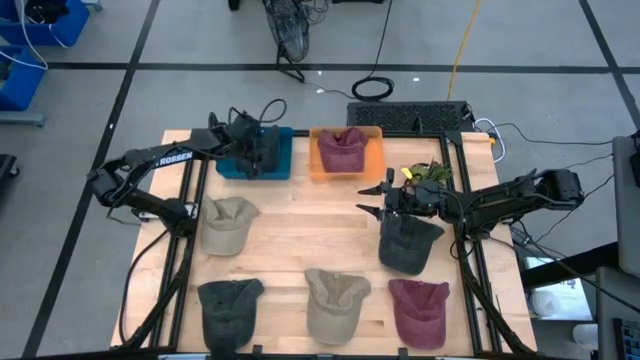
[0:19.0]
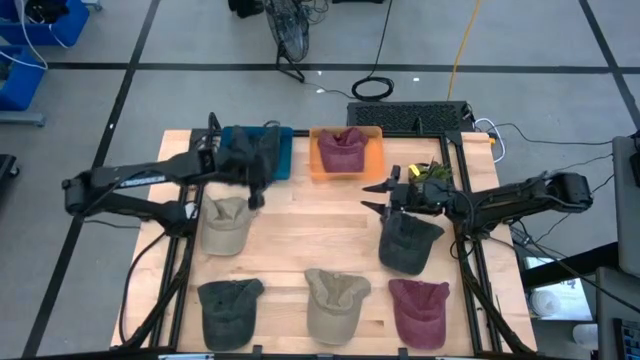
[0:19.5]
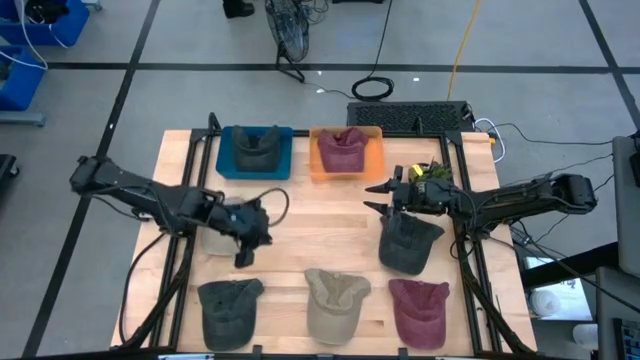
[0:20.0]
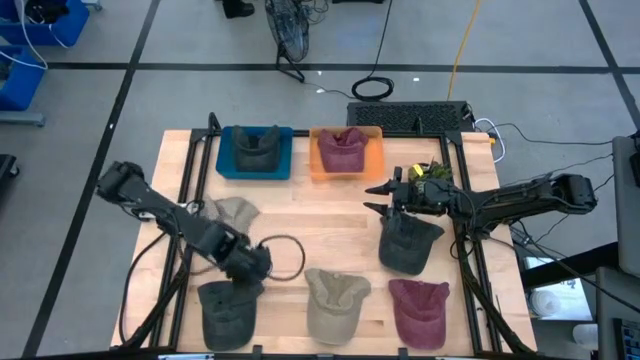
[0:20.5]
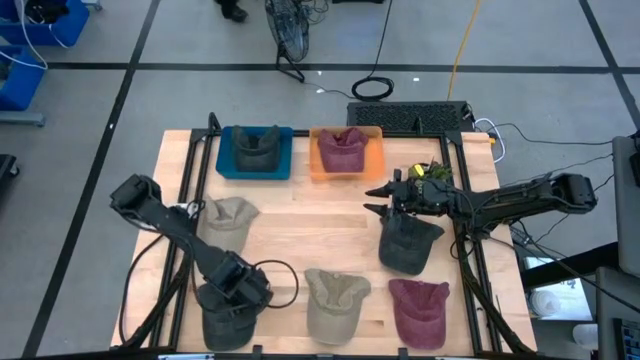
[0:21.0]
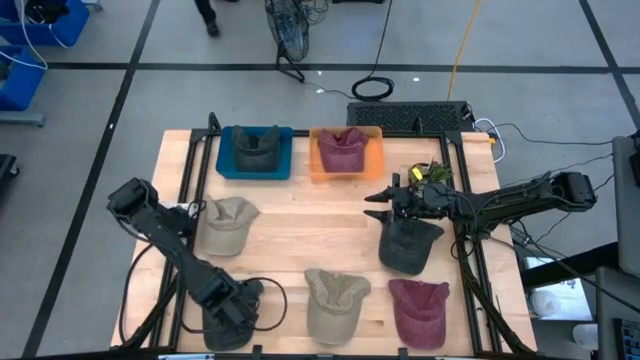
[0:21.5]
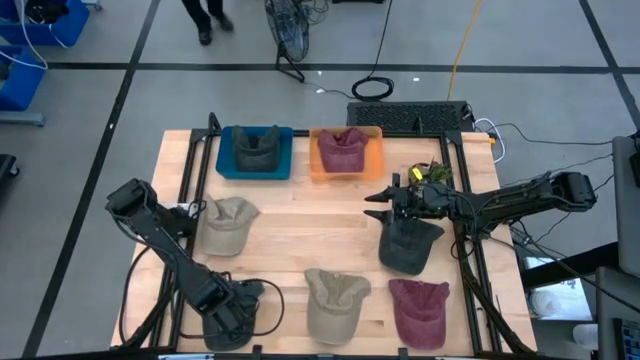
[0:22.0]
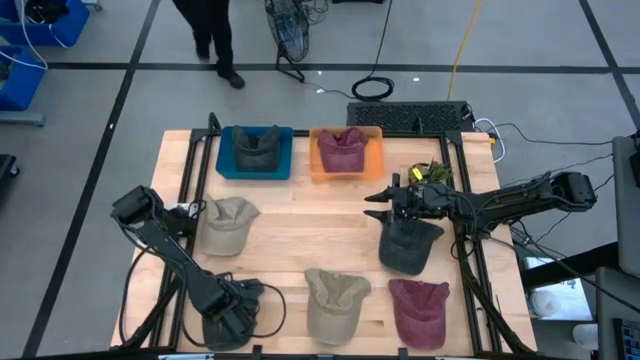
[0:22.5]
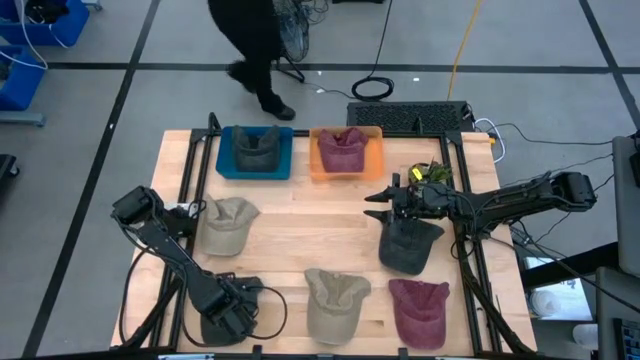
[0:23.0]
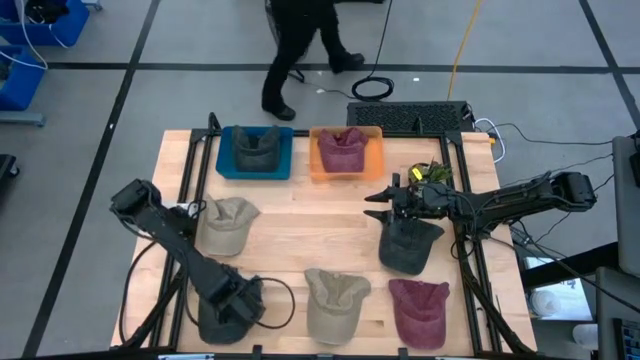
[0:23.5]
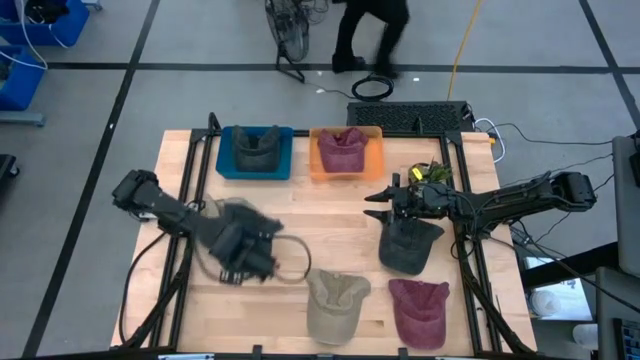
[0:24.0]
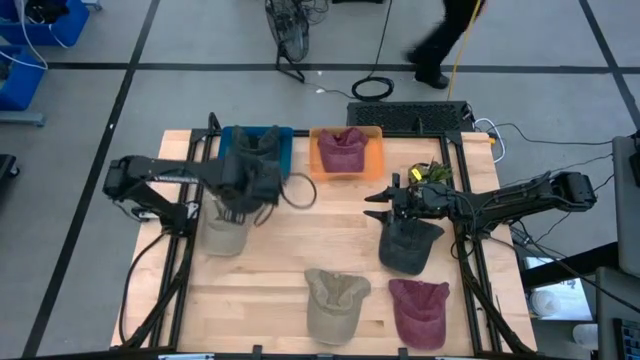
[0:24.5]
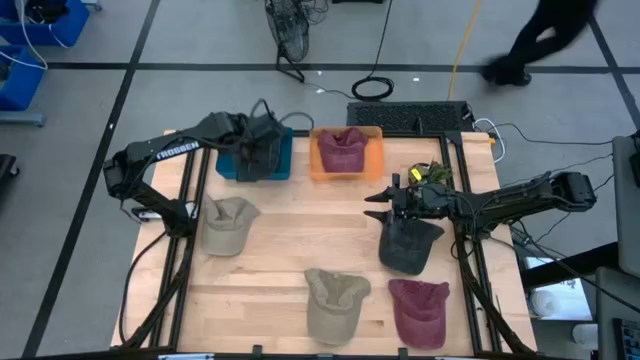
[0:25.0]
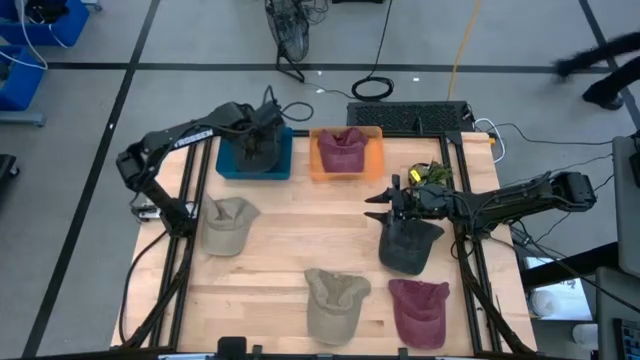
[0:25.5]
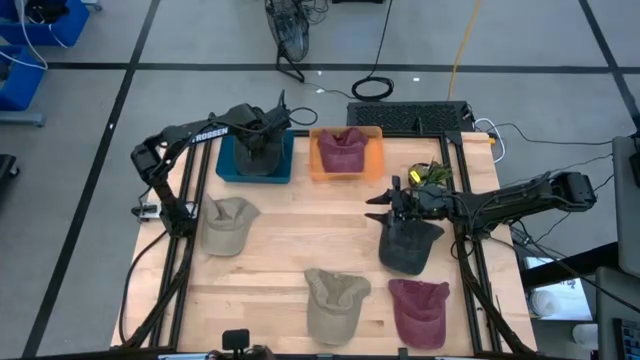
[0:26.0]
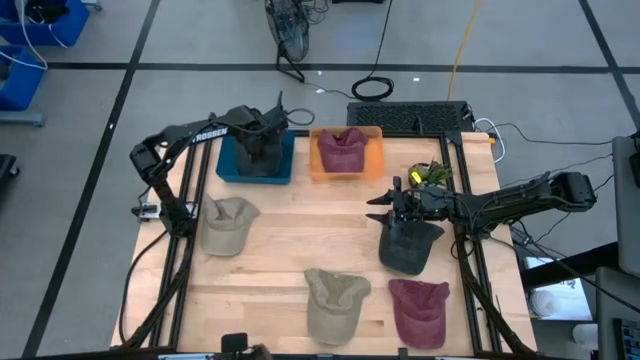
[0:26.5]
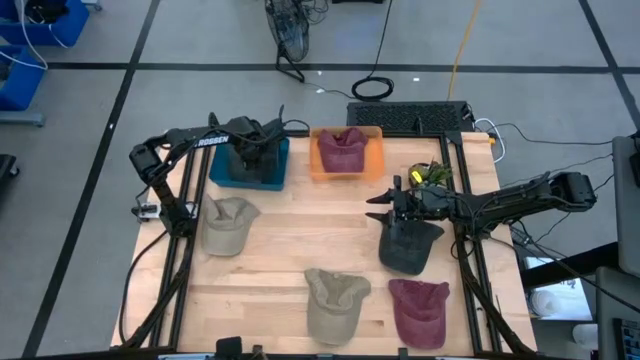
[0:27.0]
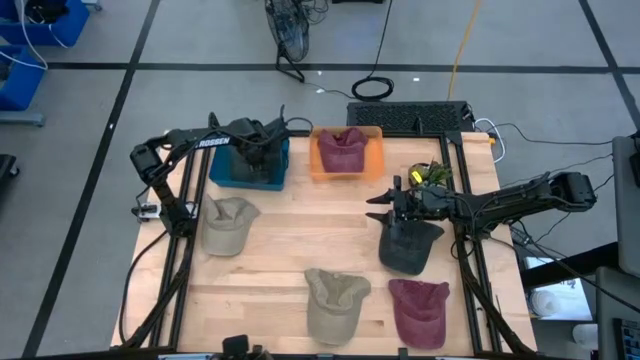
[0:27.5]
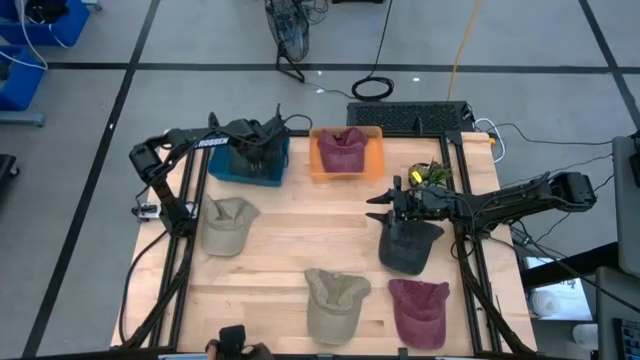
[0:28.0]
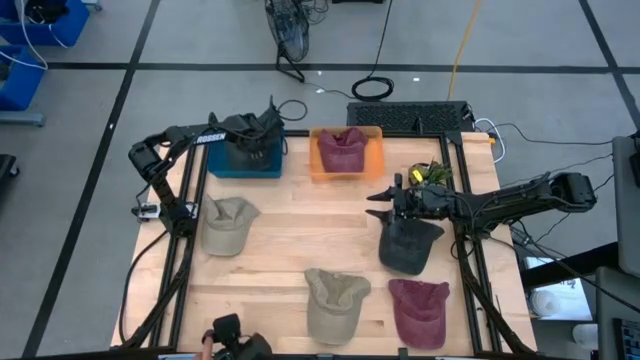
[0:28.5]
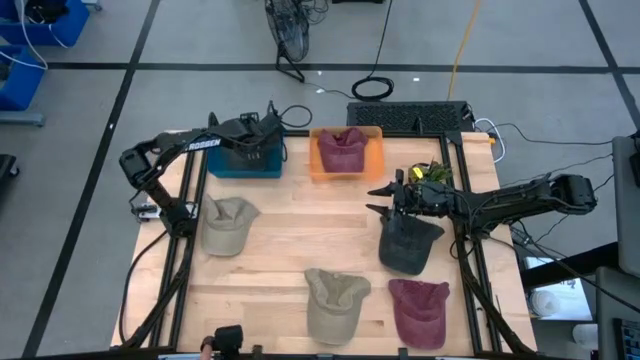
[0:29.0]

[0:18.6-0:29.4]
Task: Pick & Place hat
Put the left black cap into the blue bin

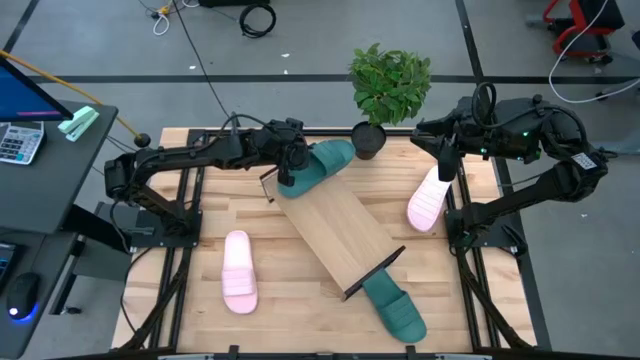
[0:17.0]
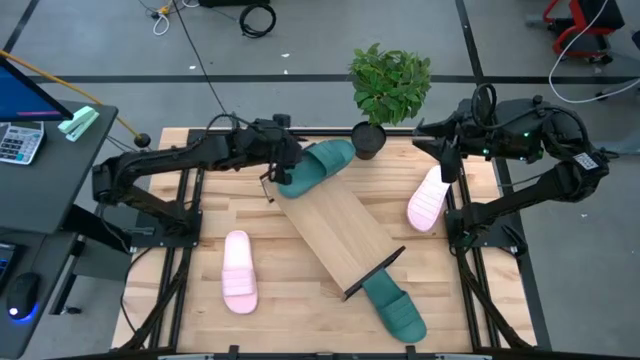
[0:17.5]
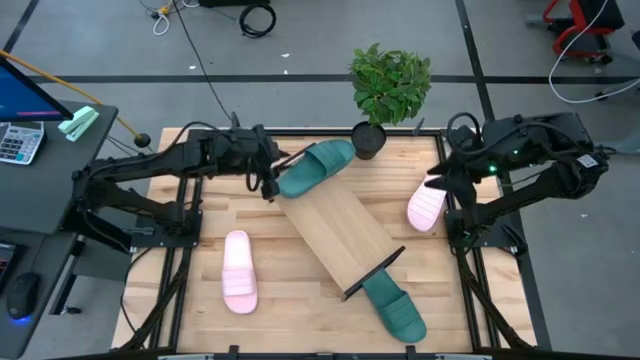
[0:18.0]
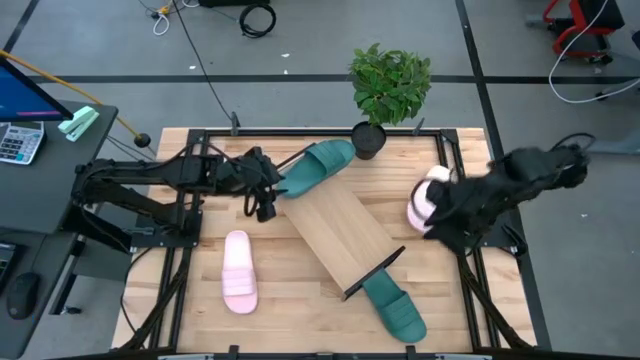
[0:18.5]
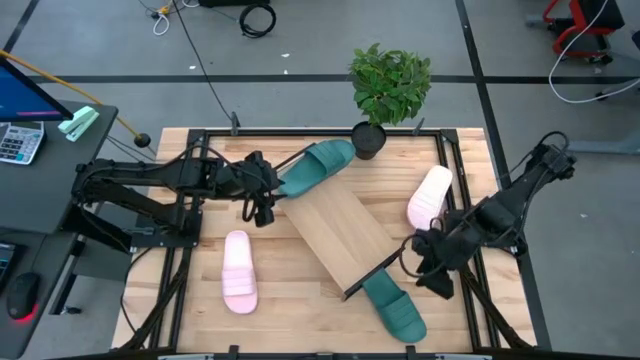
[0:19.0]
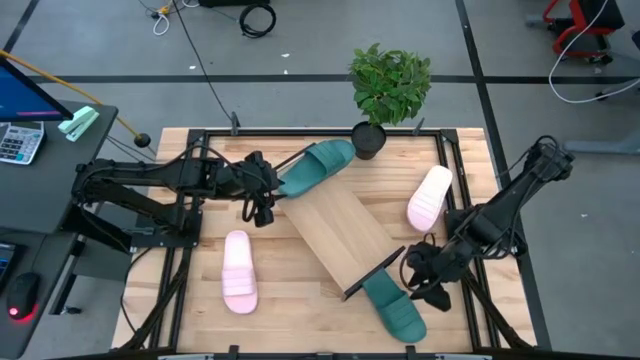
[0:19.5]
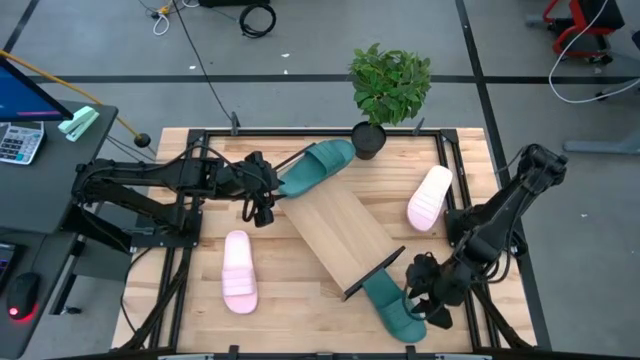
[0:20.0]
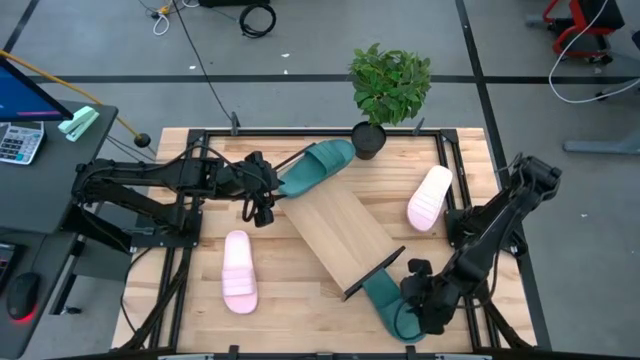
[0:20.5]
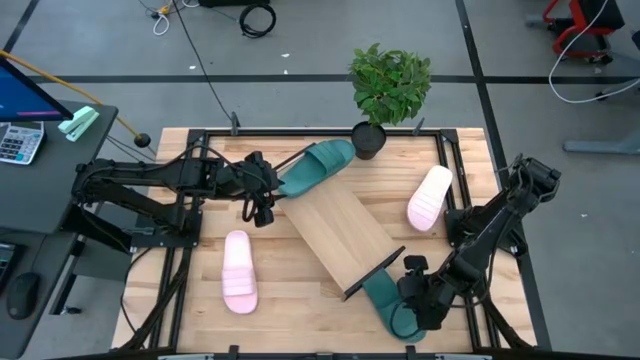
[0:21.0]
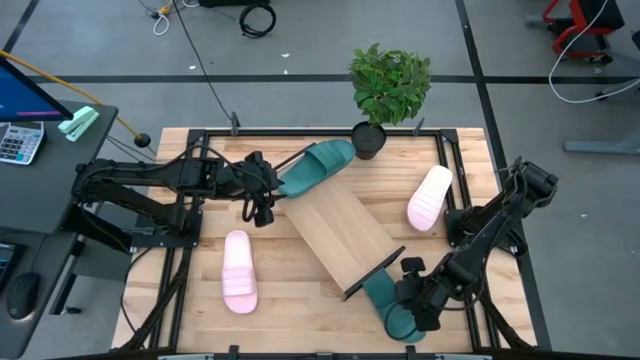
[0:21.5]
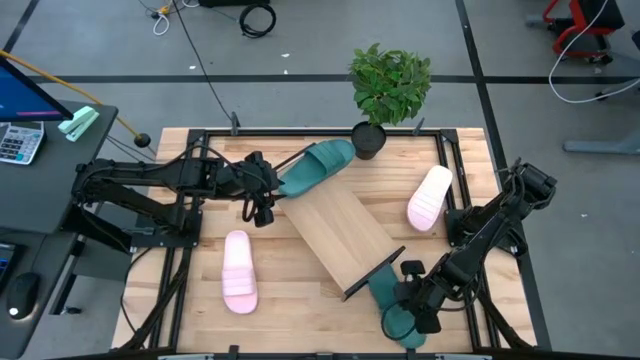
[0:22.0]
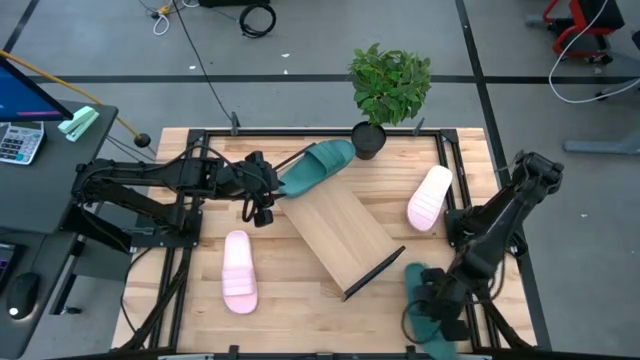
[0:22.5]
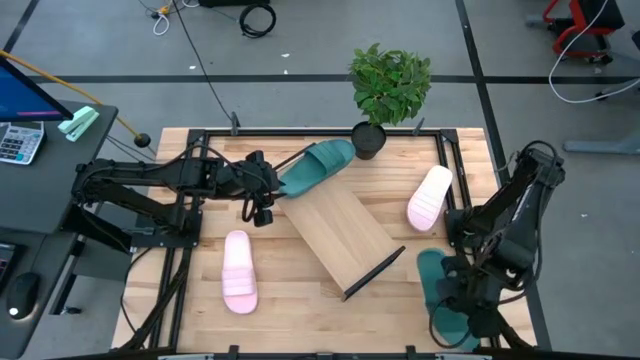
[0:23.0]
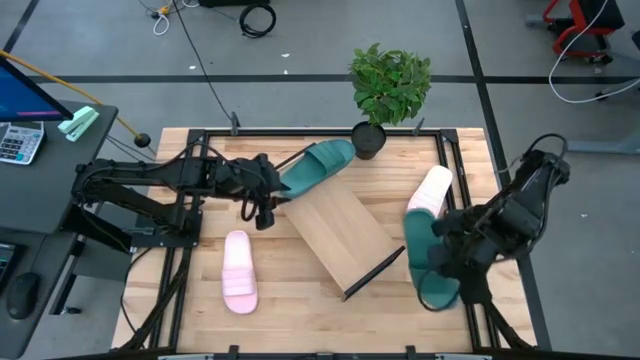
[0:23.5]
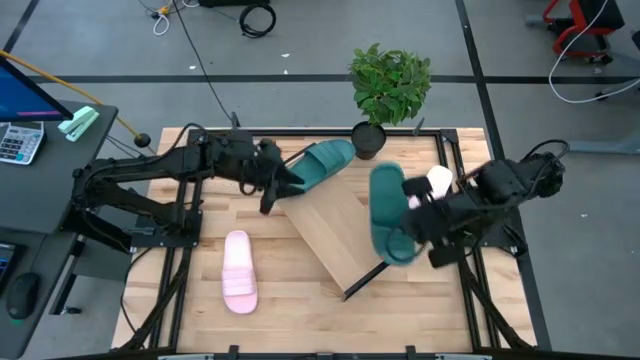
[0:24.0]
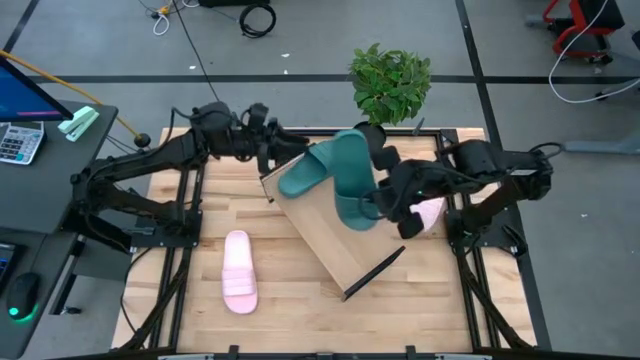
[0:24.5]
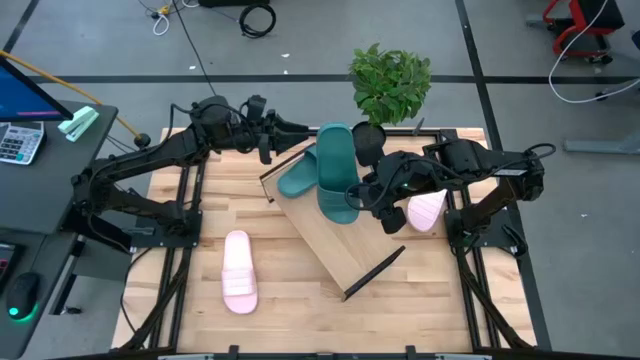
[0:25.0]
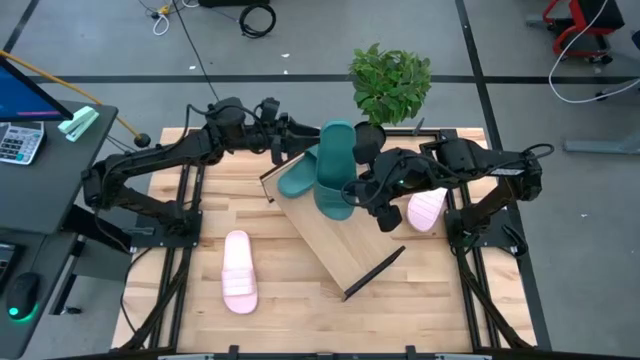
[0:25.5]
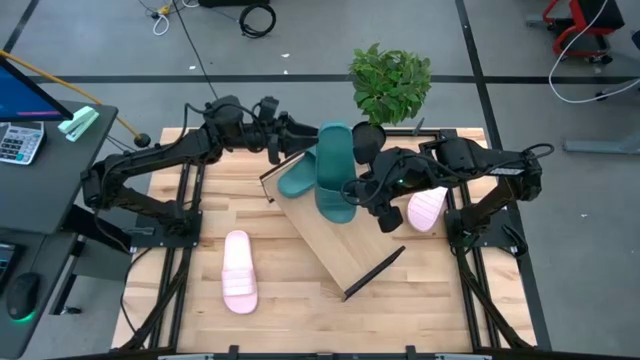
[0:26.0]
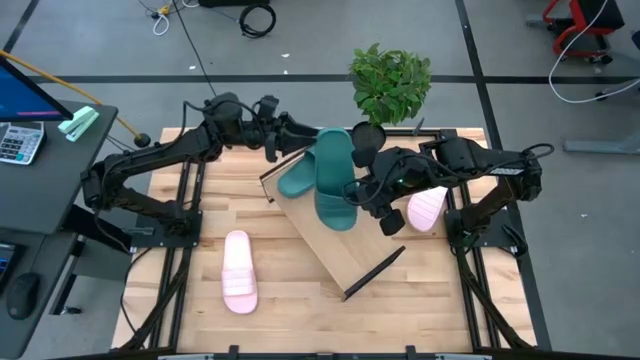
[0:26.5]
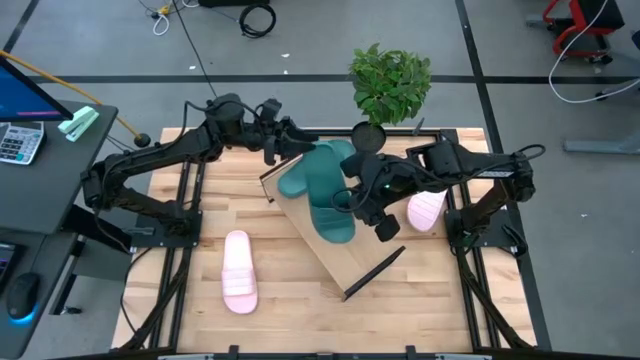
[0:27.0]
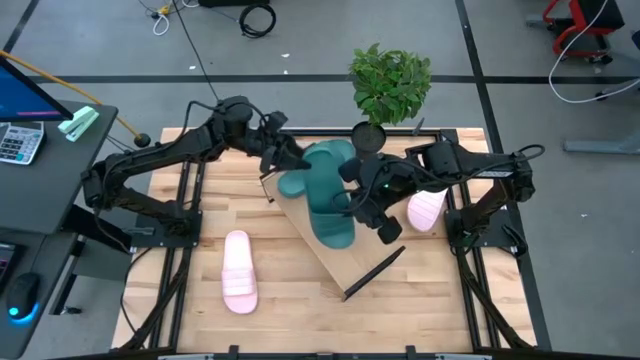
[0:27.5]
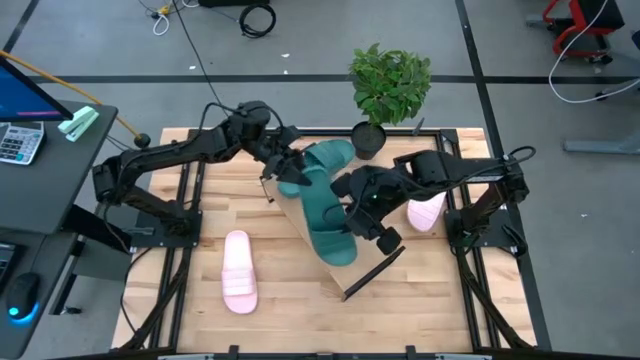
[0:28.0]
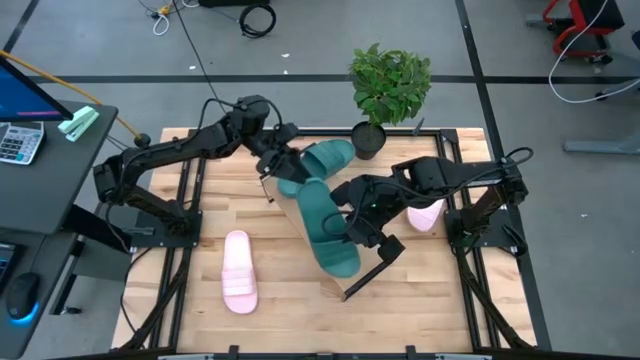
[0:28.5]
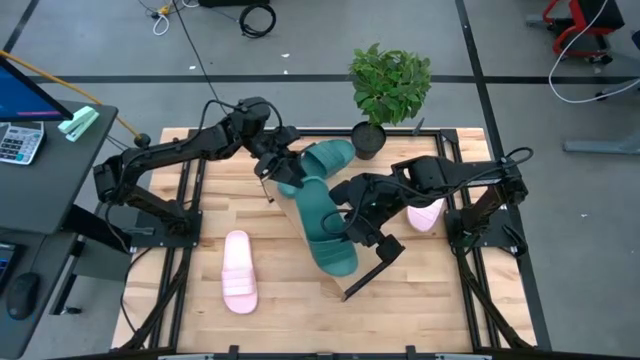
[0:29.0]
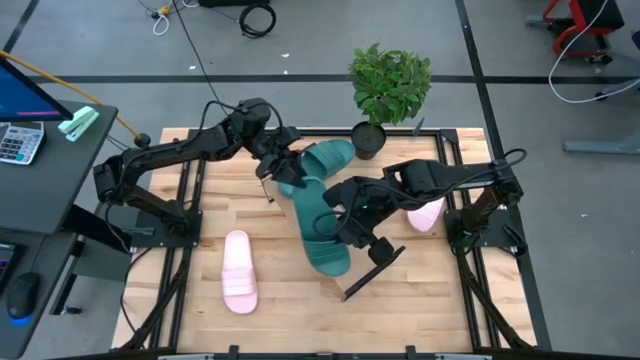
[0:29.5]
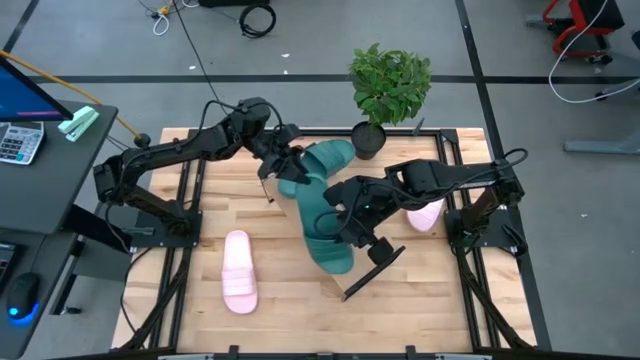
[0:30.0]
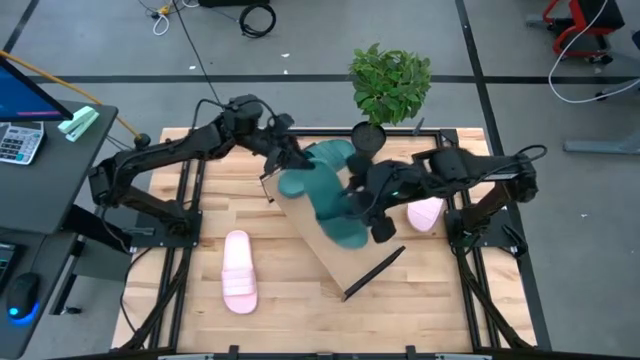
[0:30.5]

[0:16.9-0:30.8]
Task: Pick and place slides into the shelf
Put the green slide on the shelf
